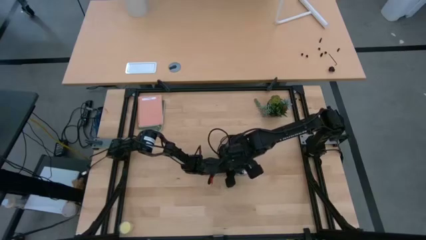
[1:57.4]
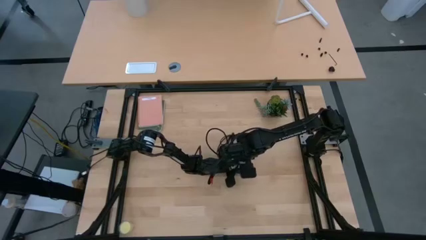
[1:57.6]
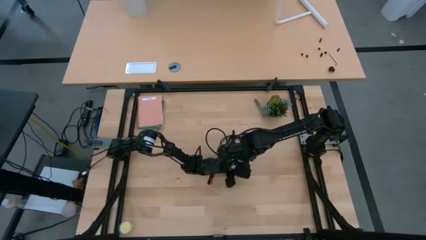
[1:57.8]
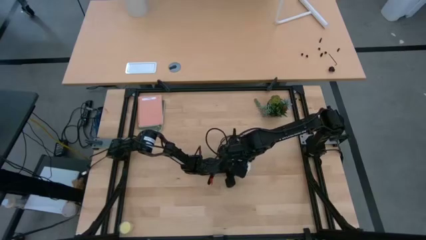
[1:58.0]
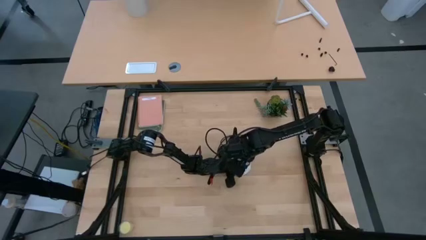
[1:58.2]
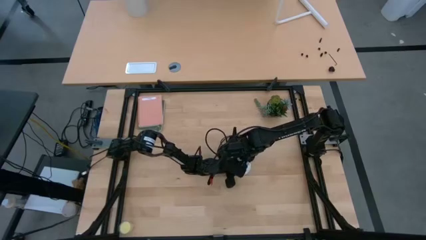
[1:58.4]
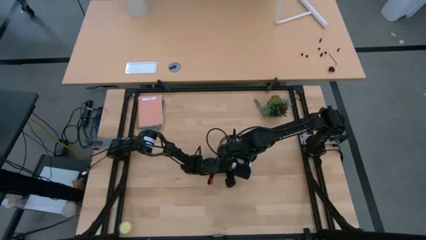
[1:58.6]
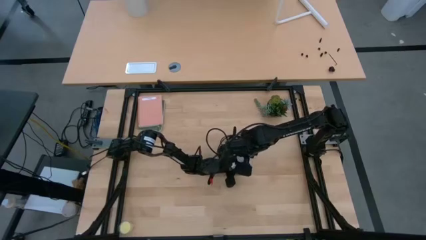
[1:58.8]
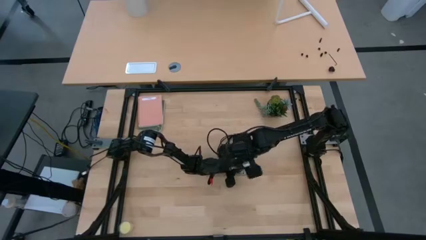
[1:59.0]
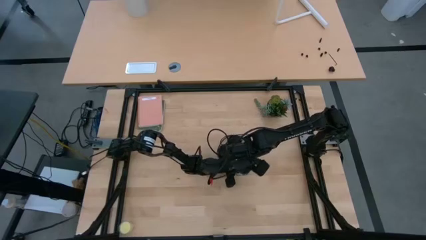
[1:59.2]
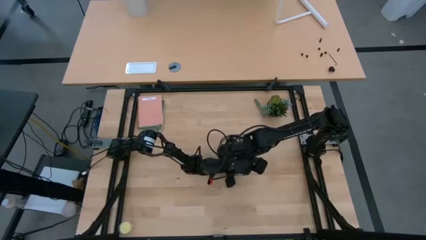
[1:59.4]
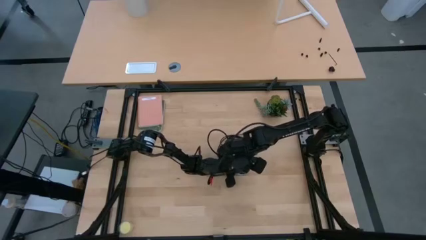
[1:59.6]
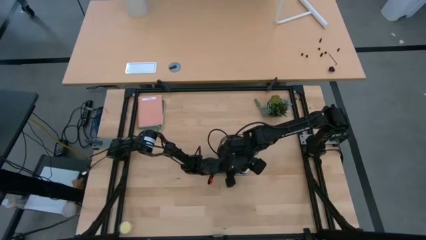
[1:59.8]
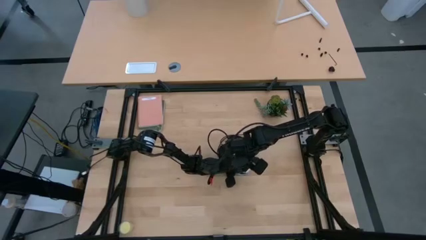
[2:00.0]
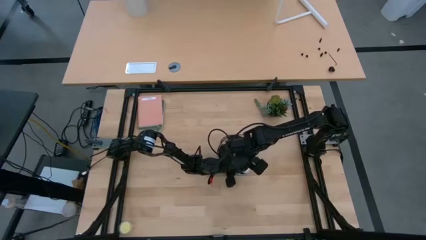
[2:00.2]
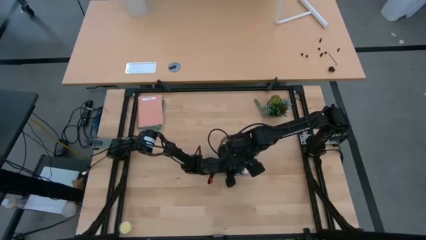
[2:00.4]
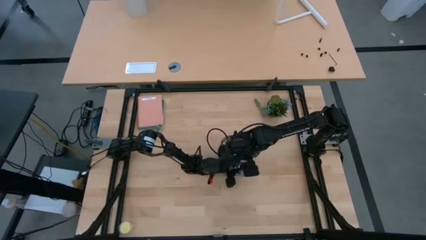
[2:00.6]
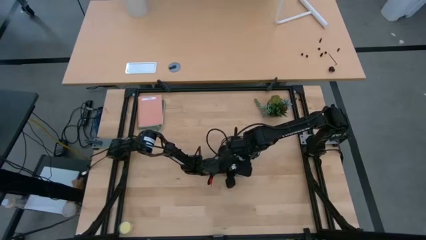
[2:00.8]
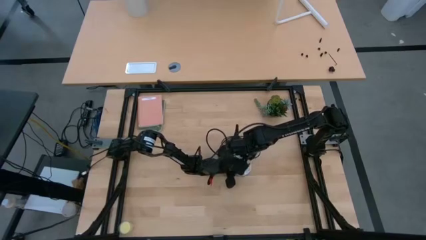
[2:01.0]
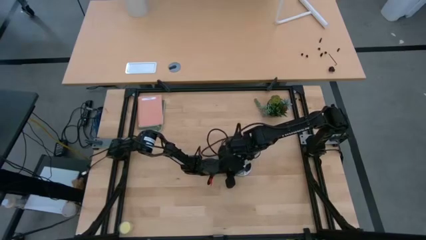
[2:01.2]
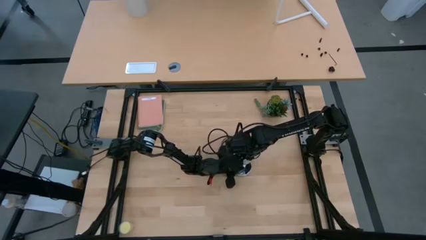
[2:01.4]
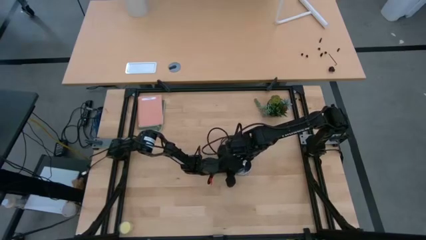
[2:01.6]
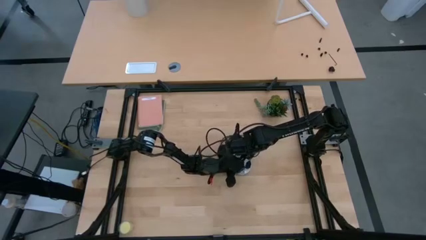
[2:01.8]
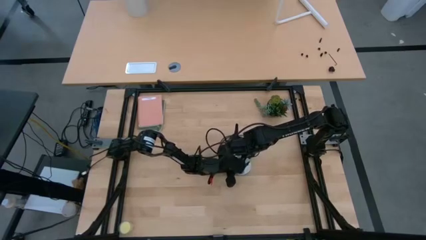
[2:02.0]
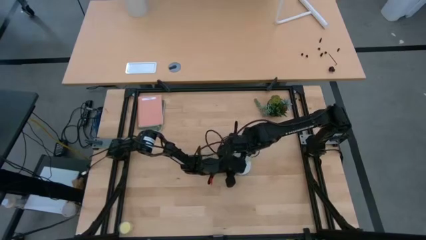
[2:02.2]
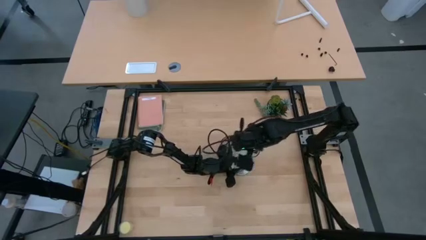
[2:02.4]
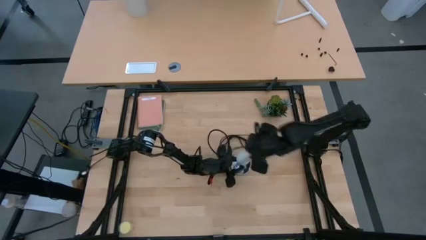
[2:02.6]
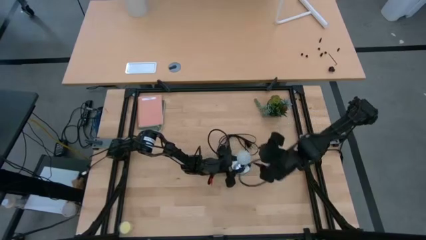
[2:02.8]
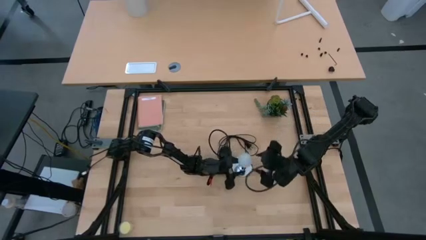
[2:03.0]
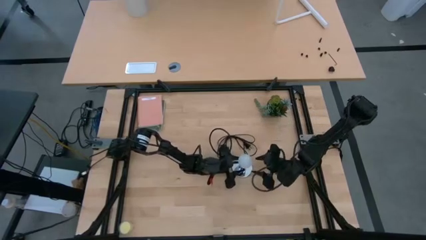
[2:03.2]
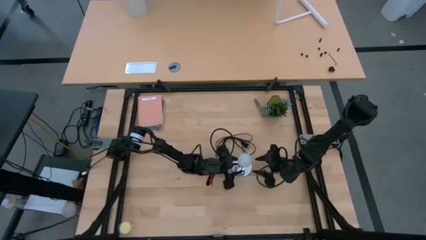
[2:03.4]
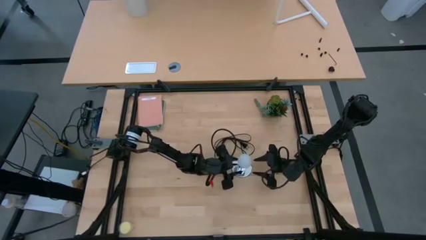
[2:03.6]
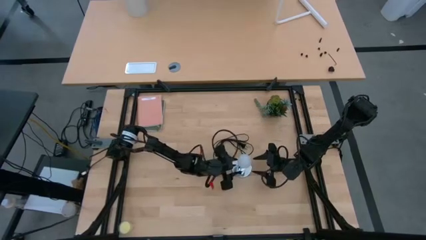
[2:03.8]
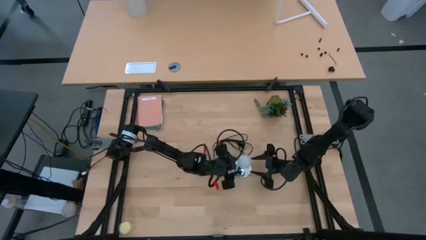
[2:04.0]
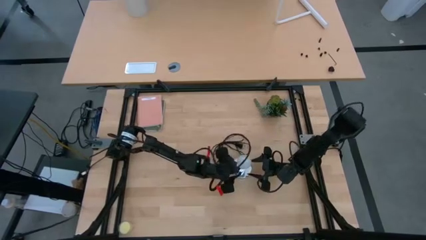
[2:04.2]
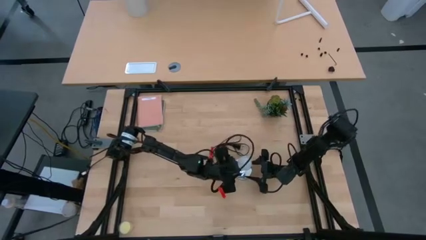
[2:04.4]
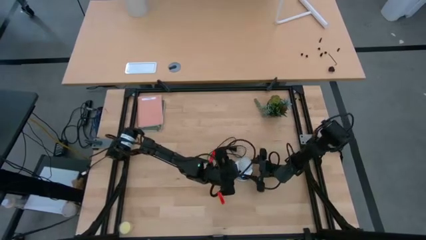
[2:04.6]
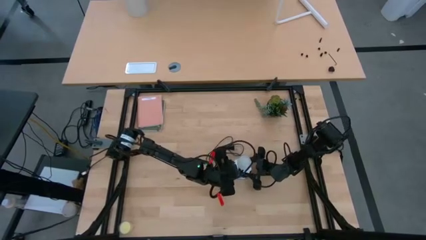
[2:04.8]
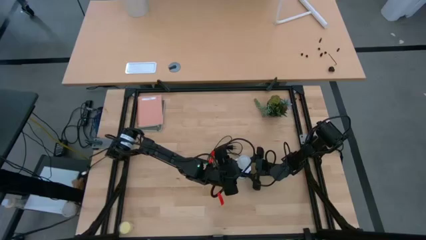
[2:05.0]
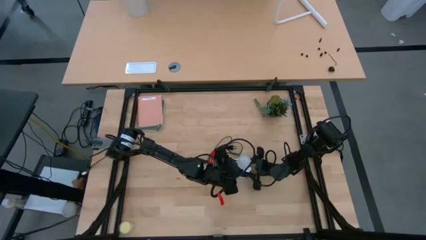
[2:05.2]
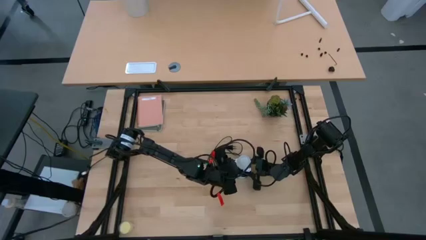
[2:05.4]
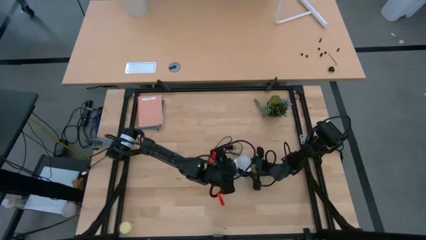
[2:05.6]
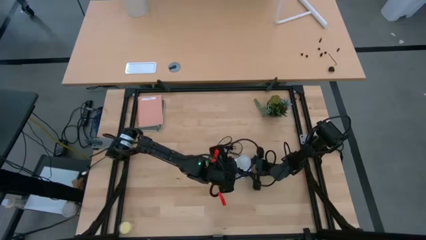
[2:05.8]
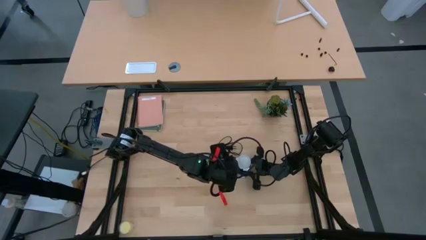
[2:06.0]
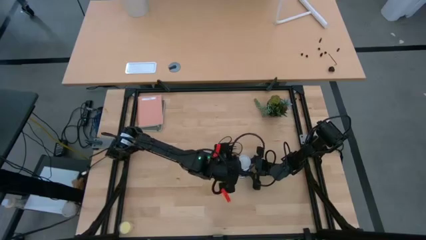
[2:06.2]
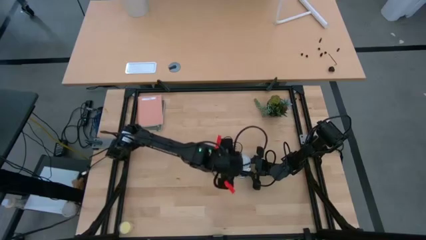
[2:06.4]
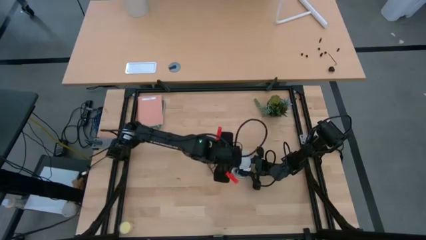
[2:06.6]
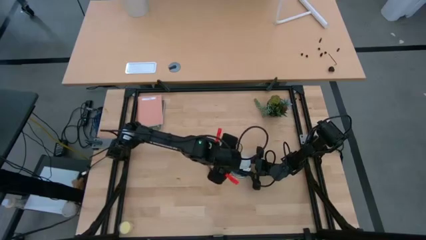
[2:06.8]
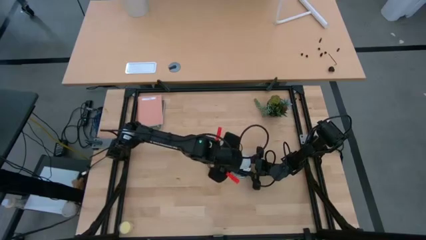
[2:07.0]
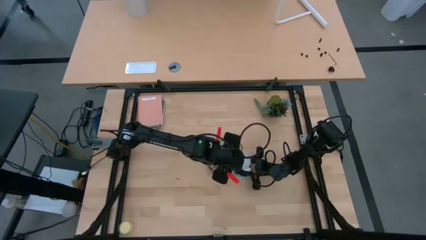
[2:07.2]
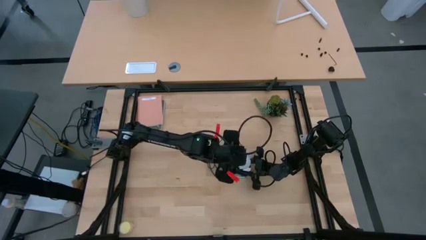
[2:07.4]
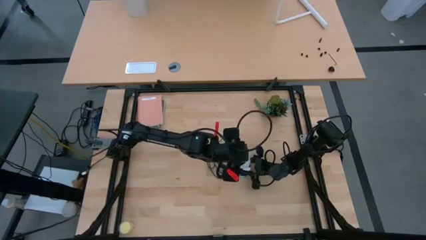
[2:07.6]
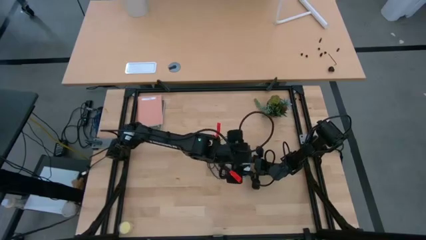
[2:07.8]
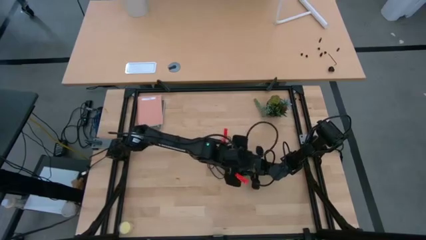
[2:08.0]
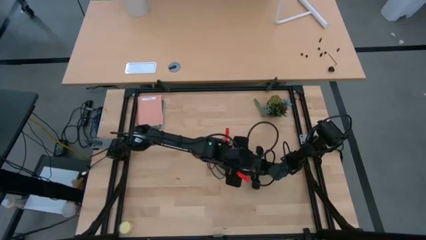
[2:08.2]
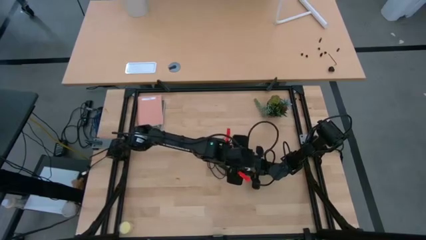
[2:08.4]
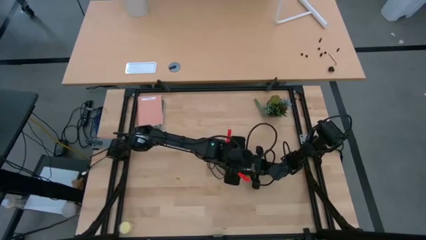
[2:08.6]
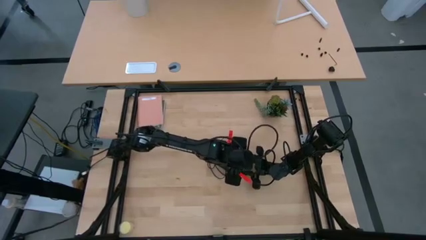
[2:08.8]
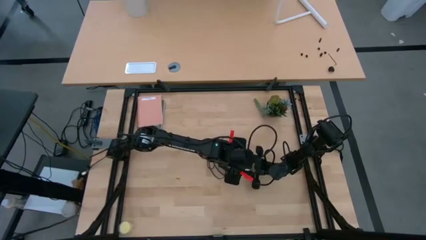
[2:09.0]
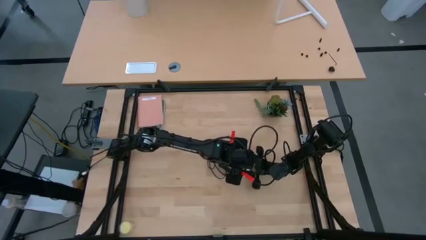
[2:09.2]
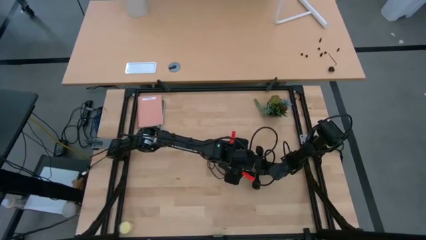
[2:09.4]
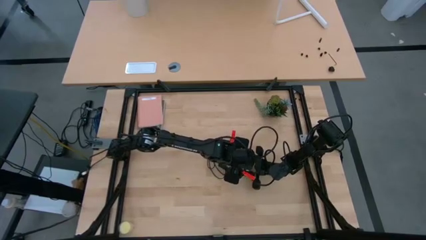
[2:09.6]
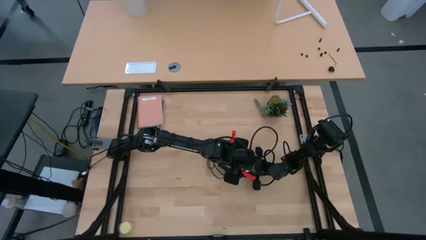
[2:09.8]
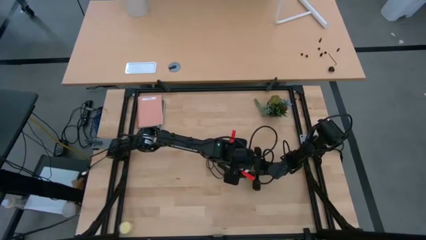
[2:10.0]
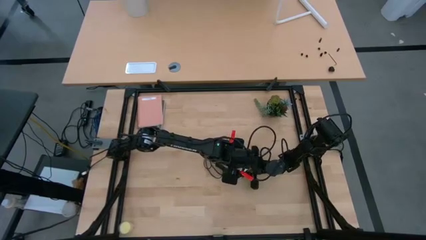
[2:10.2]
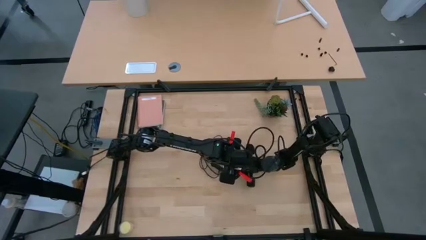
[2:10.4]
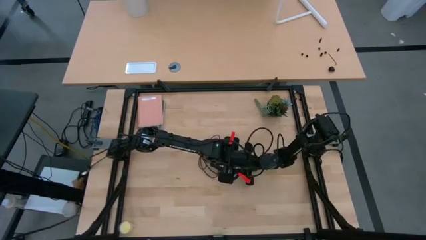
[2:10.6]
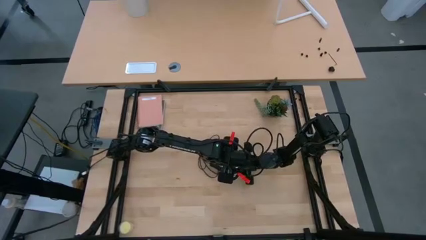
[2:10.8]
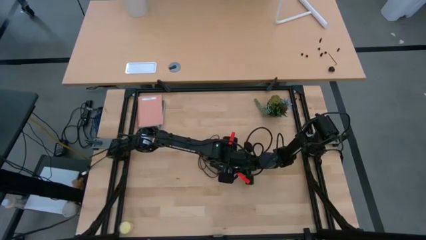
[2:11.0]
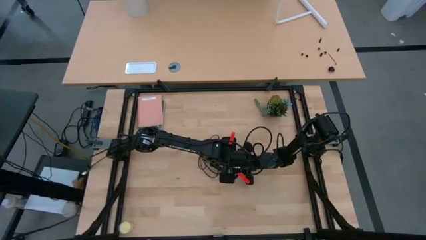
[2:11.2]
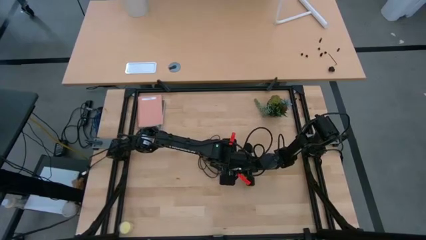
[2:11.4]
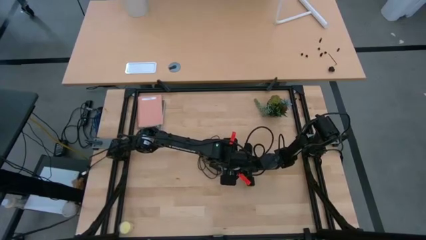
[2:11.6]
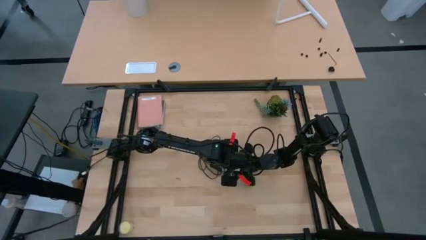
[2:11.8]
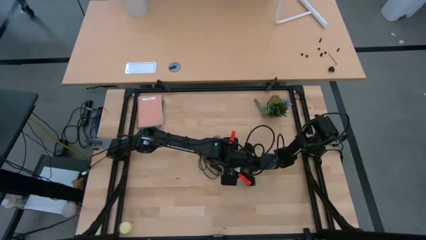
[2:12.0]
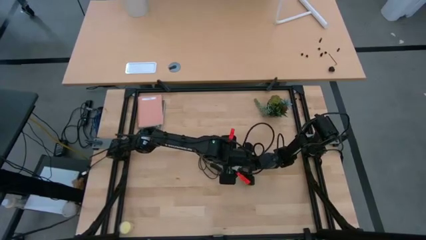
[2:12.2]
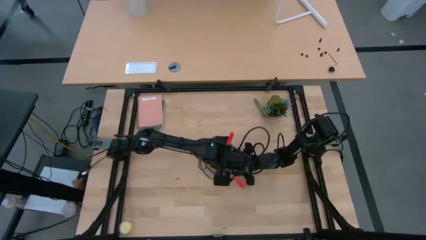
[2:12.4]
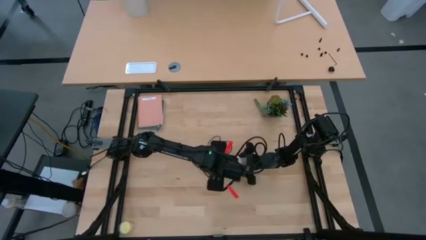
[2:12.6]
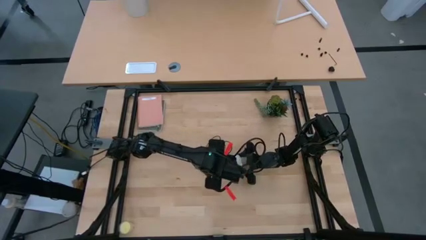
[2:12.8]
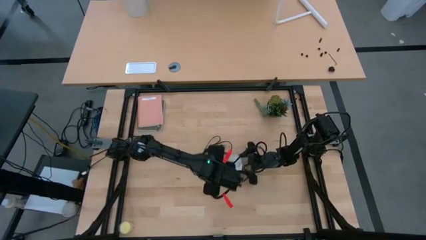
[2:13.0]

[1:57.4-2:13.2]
Task: Screw lightbulb
Insert the white lightbulb into the silver lamp
